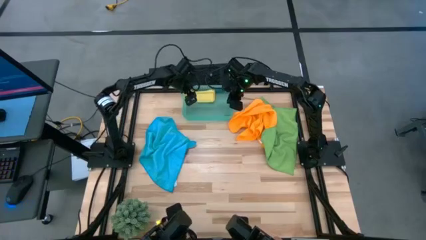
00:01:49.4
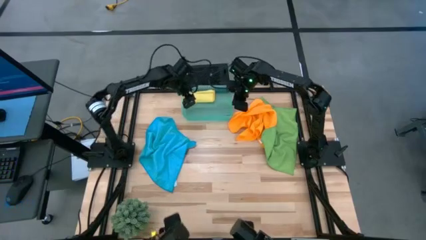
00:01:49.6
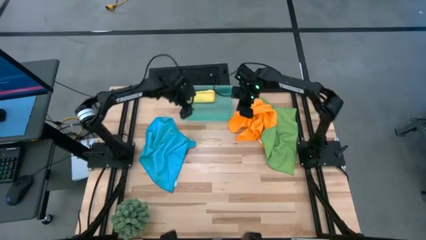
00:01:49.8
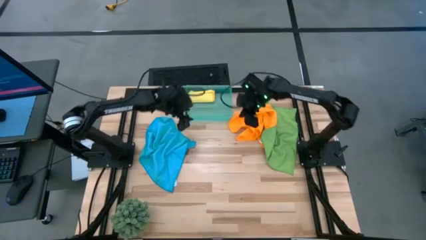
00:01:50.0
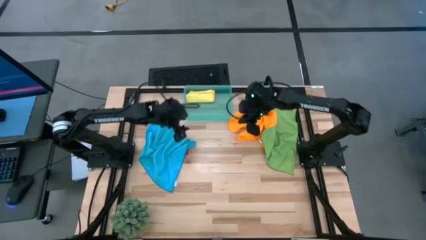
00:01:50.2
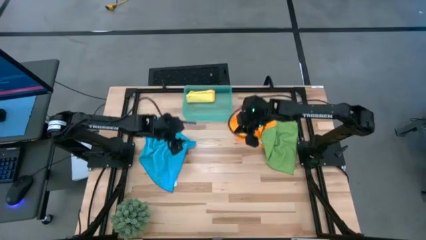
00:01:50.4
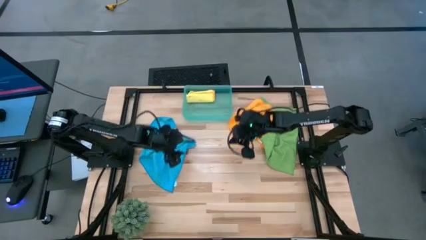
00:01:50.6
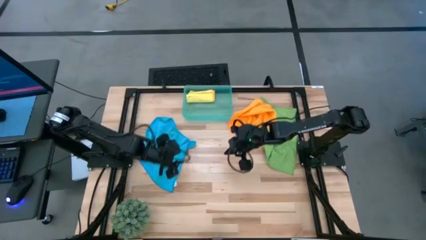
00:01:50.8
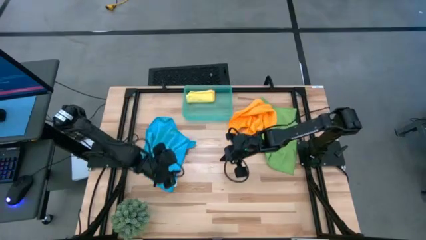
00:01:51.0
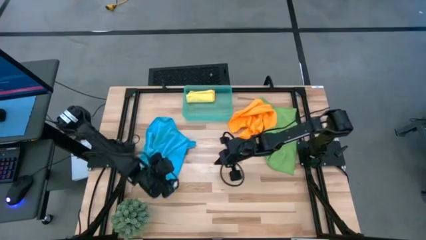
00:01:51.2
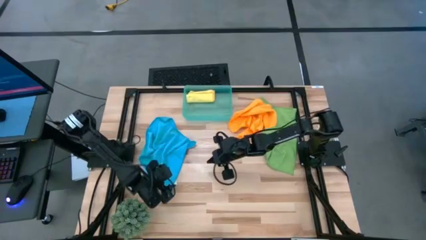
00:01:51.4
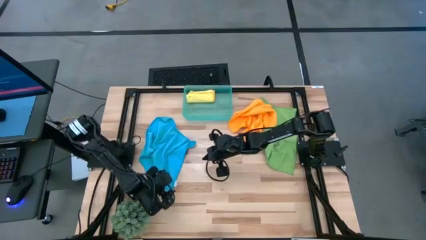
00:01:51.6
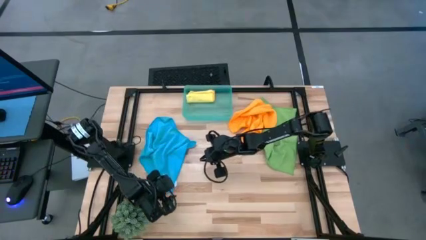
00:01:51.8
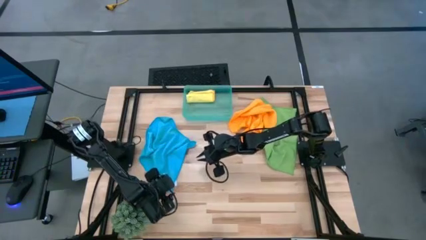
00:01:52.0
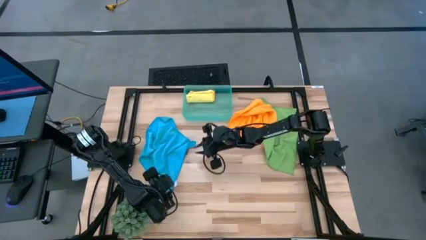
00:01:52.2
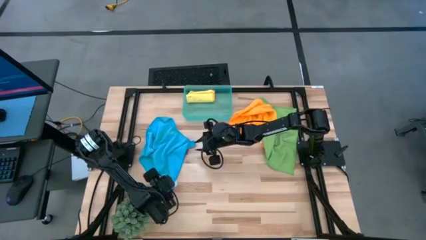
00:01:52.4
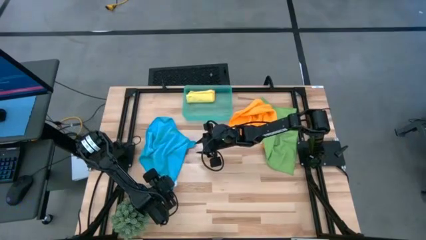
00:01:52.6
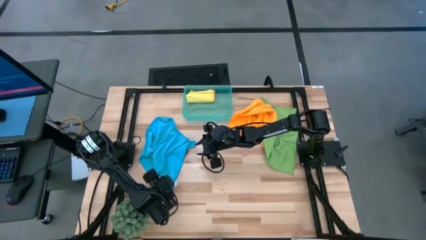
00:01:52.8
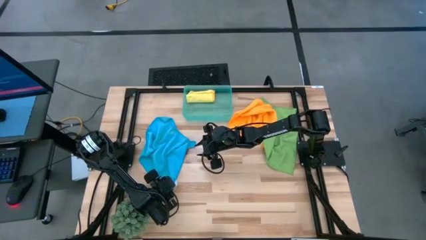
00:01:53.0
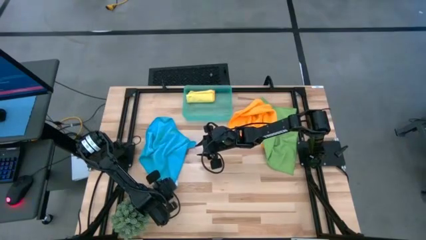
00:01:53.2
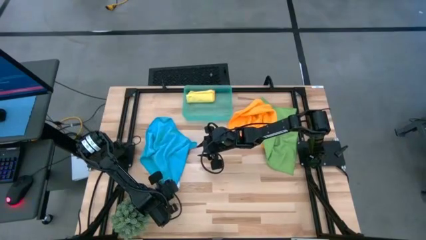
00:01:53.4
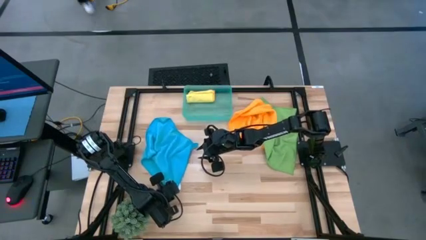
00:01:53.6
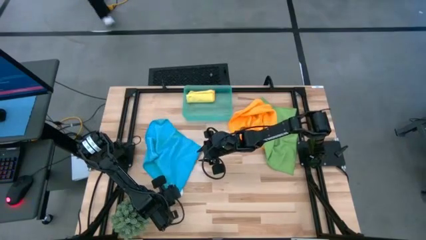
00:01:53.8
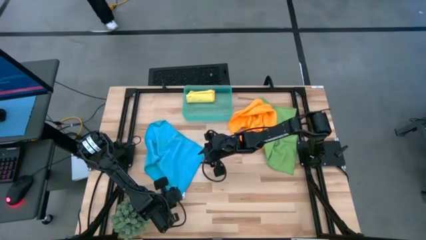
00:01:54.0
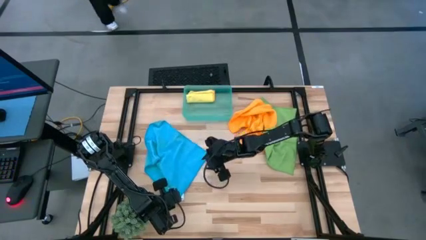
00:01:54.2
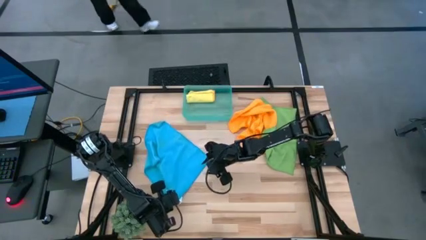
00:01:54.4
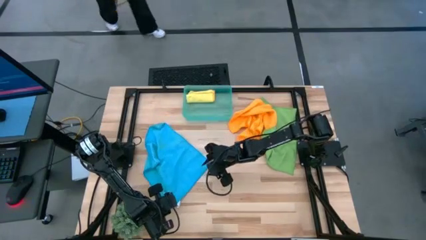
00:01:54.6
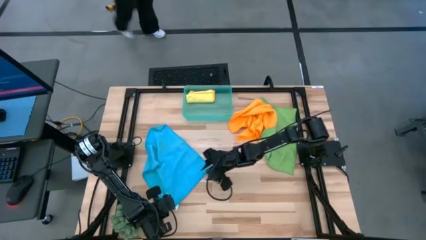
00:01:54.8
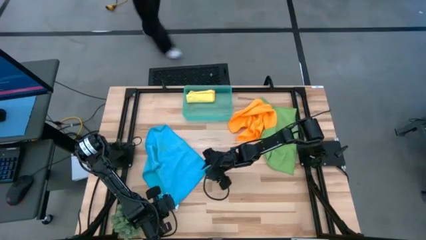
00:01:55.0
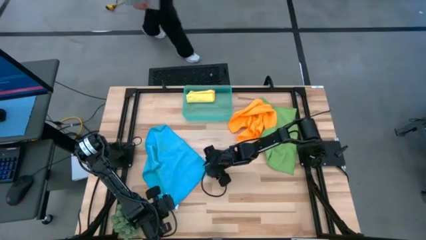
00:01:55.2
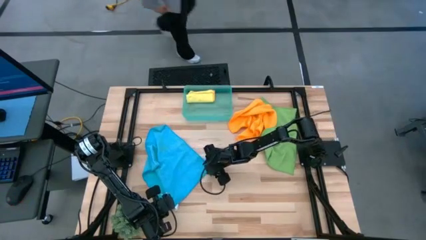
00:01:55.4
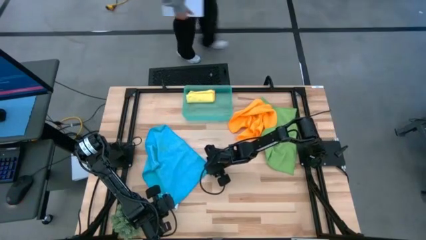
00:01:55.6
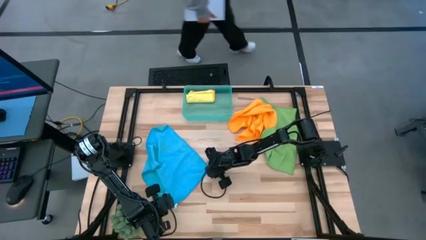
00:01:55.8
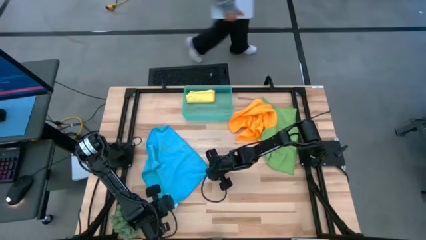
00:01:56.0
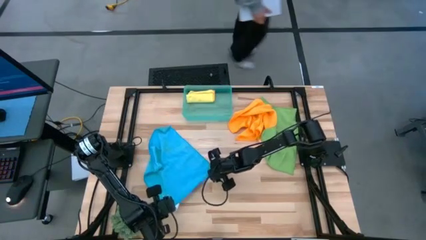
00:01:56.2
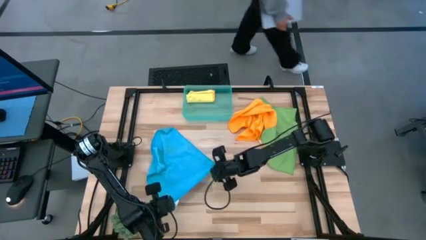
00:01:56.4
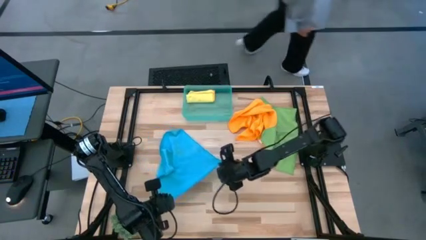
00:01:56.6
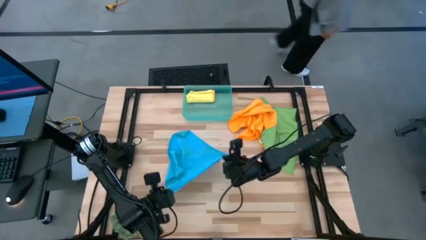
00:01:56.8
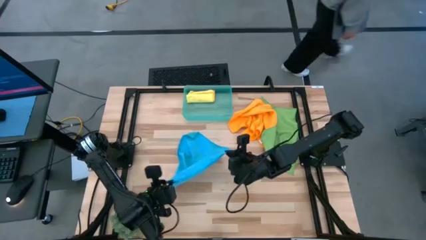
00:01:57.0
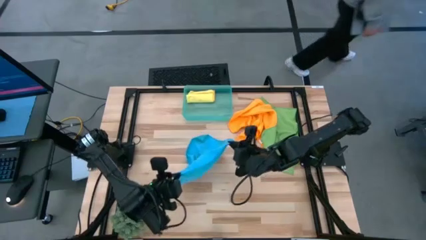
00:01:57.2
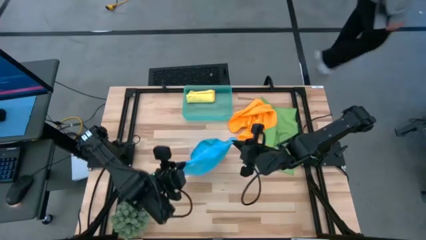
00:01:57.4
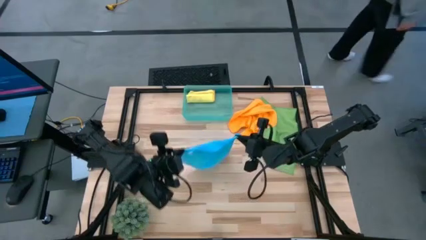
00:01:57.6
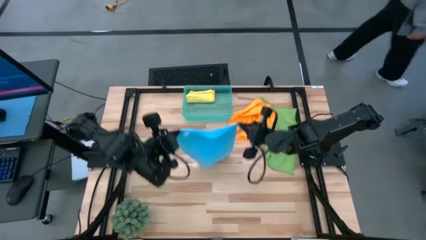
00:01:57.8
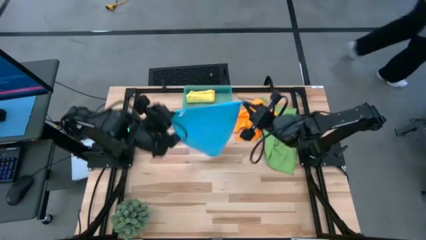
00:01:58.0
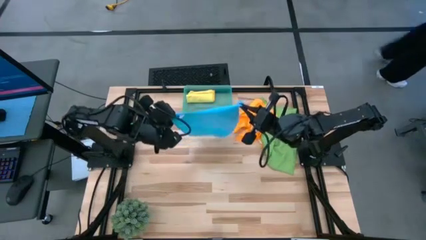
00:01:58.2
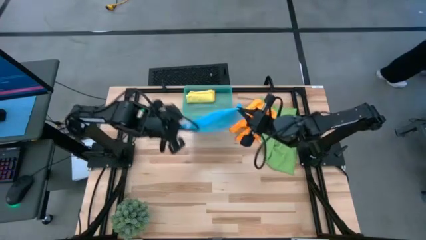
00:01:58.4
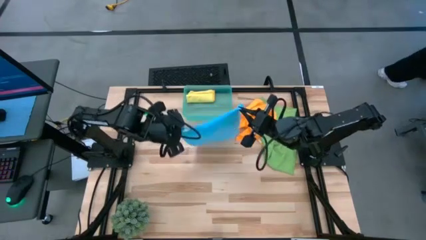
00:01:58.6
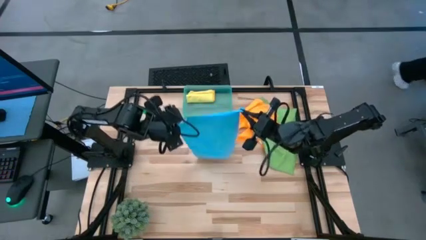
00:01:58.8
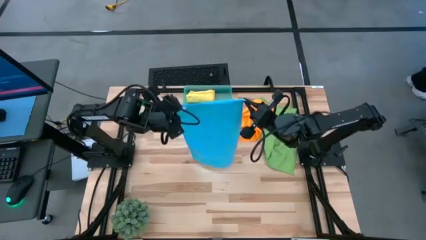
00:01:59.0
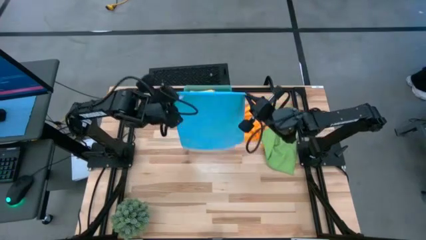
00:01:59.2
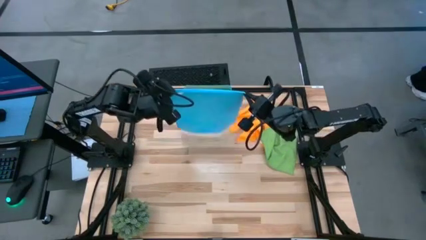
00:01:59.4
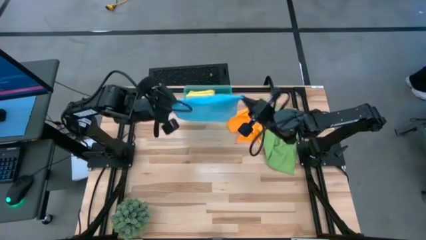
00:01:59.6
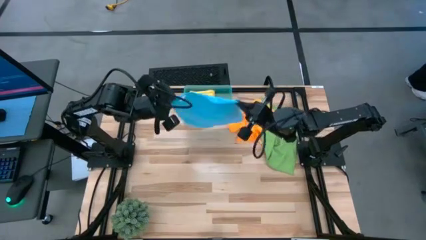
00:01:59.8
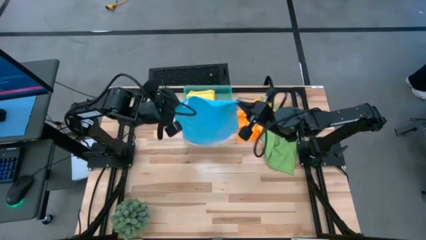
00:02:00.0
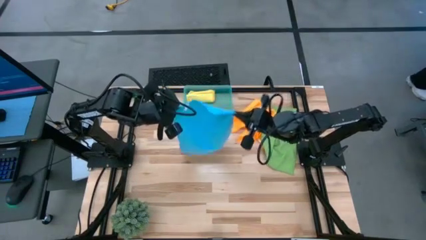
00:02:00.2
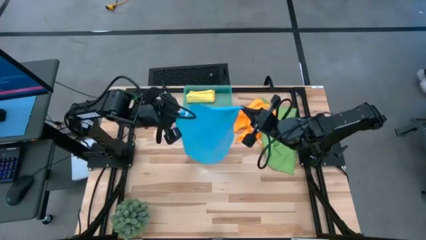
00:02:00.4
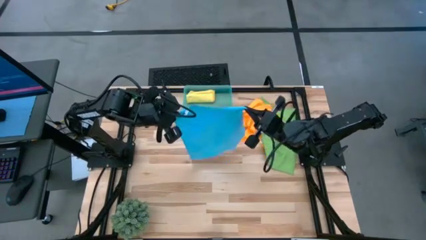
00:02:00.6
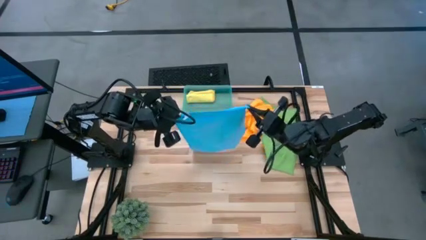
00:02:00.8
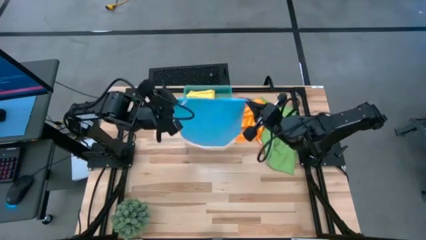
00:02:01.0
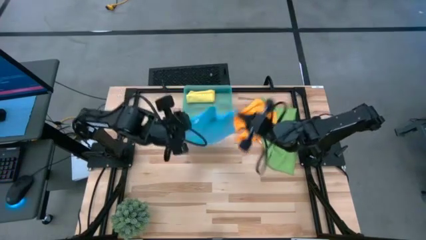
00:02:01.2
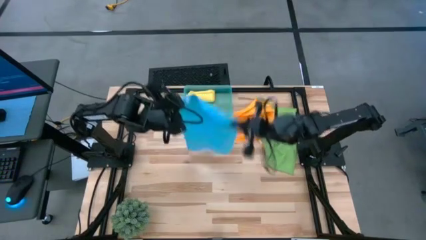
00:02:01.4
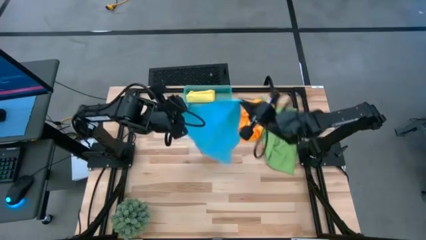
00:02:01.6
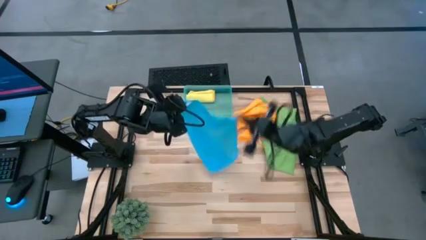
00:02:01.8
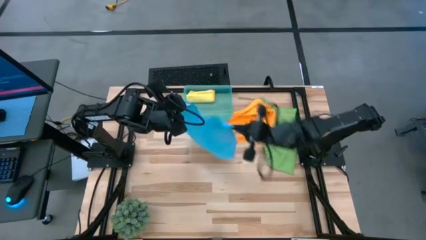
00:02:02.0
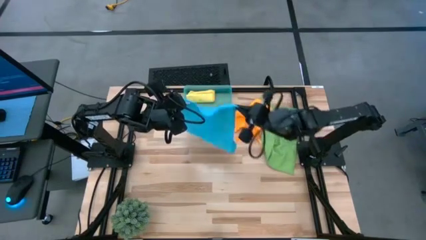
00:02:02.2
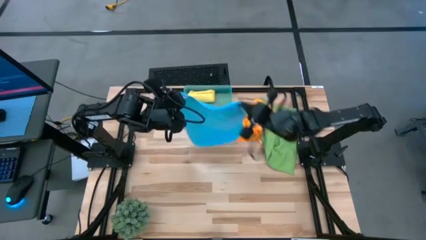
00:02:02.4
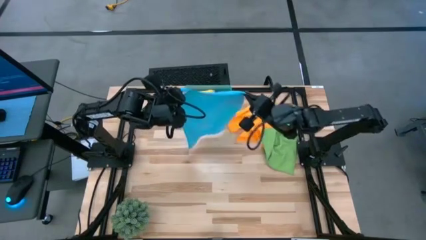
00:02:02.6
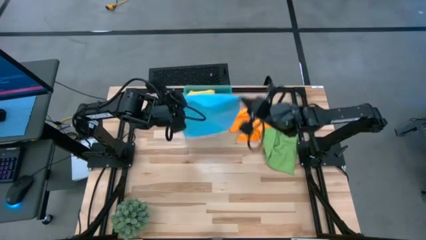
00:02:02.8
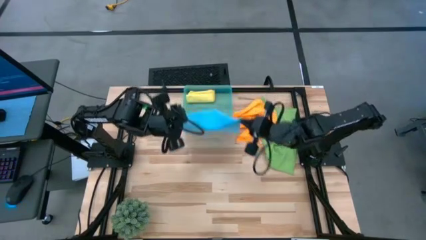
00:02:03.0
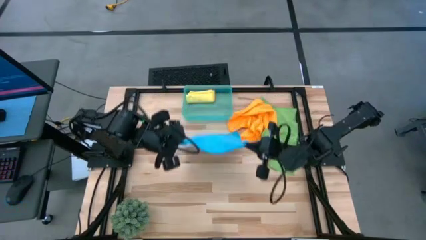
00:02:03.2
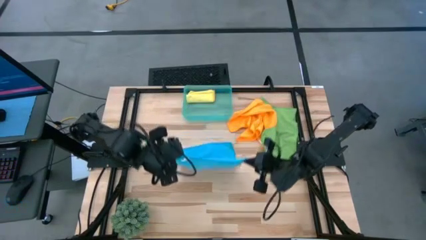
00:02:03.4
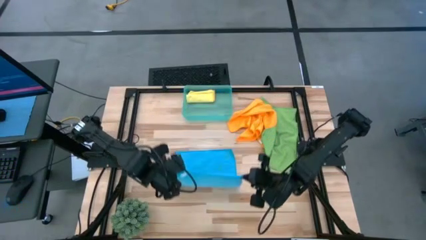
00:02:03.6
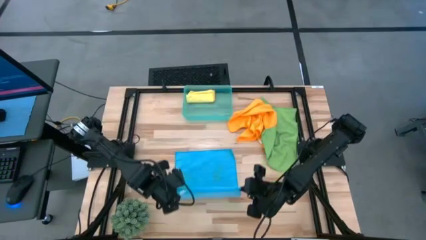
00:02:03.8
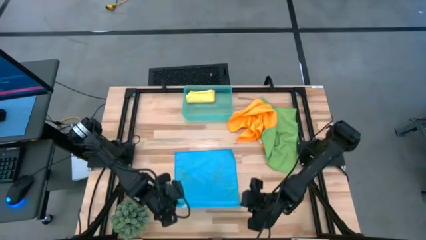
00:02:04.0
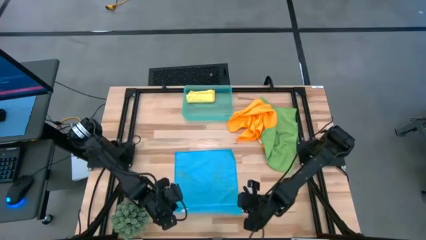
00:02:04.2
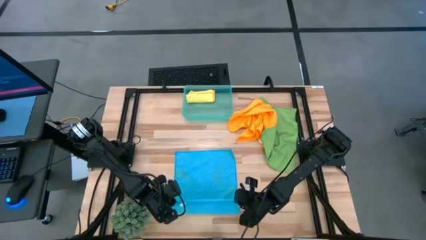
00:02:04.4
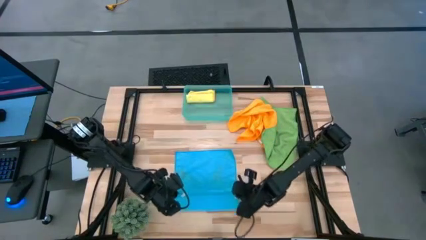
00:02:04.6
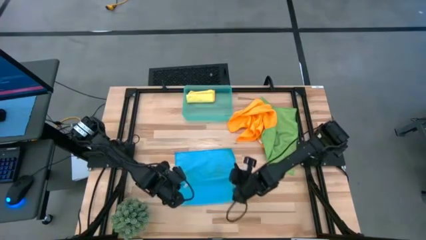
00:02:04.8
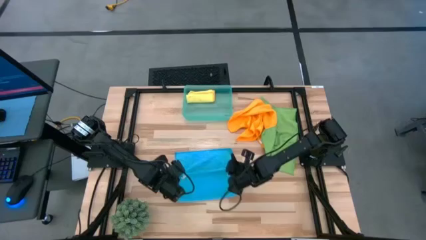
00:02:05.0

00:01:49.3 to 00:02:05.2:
Task: Roll microfiber towels into tight, uniform cylinder then place into a basket
Fold the blue microfiber towel
